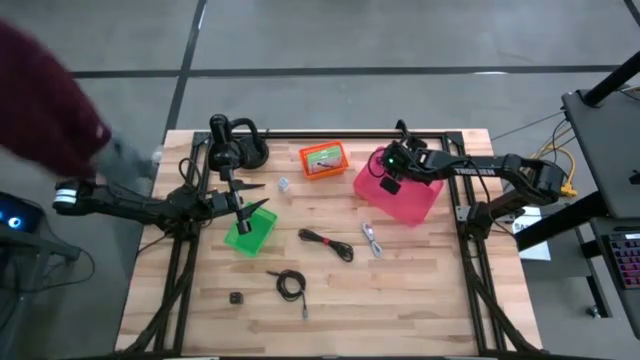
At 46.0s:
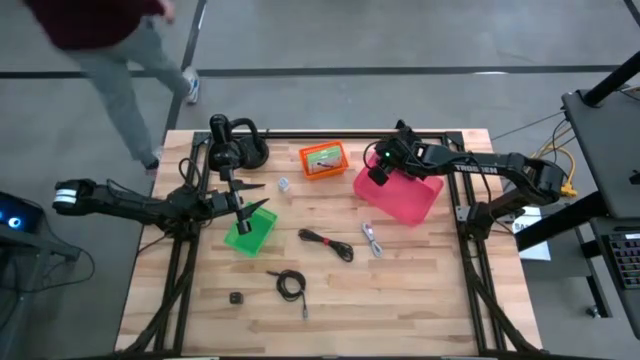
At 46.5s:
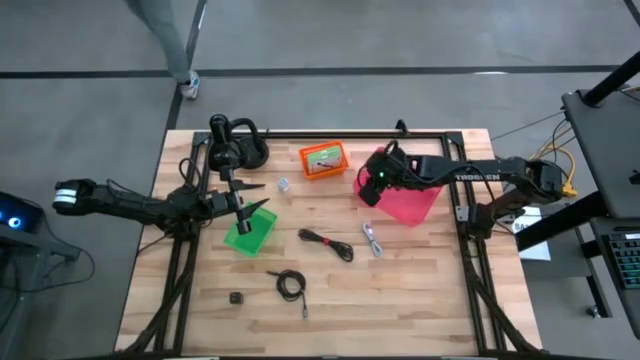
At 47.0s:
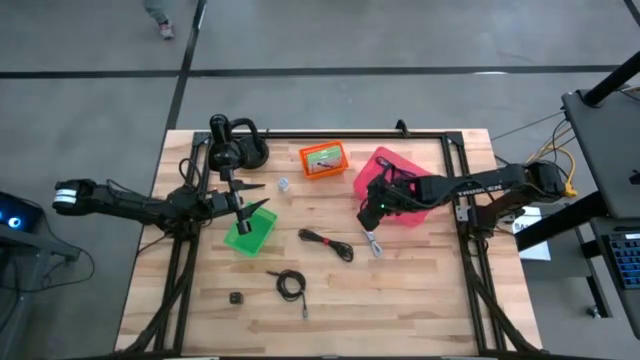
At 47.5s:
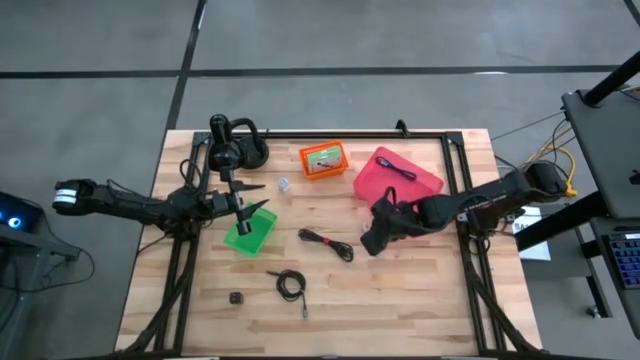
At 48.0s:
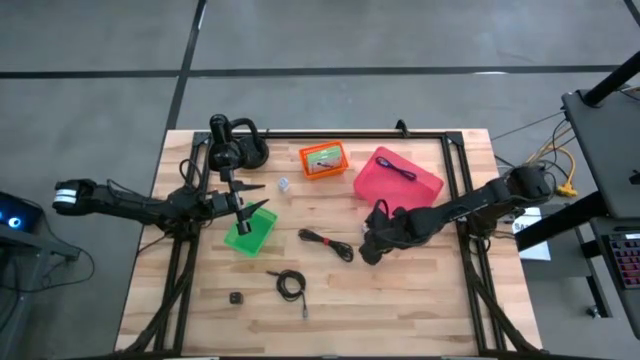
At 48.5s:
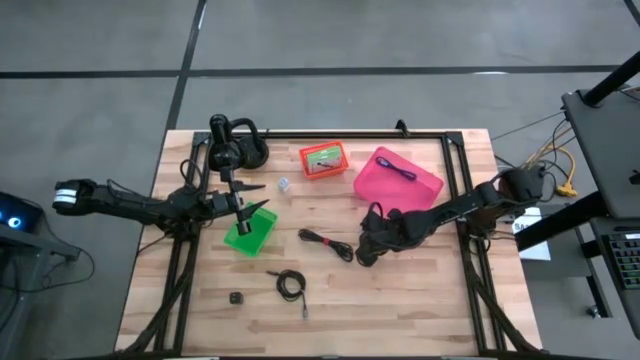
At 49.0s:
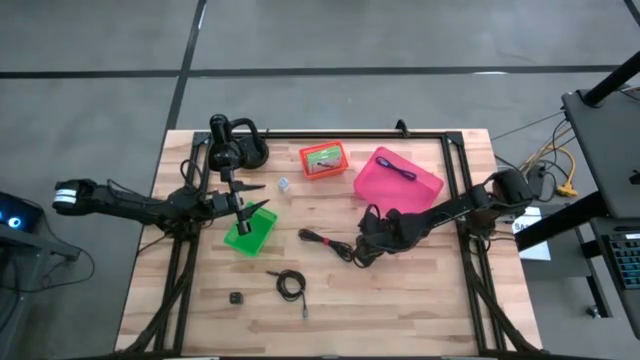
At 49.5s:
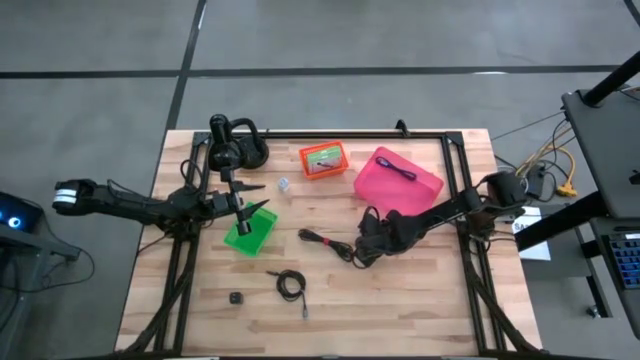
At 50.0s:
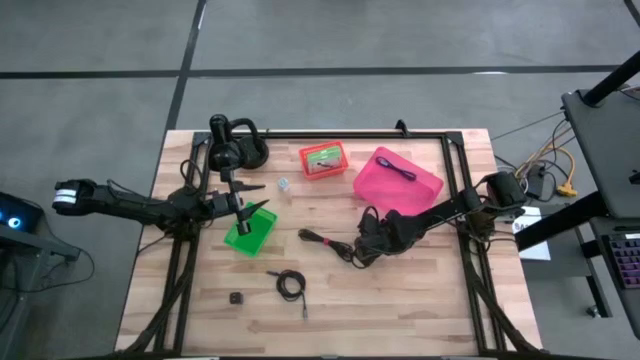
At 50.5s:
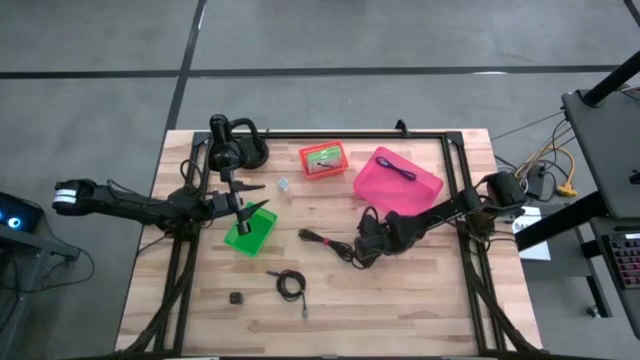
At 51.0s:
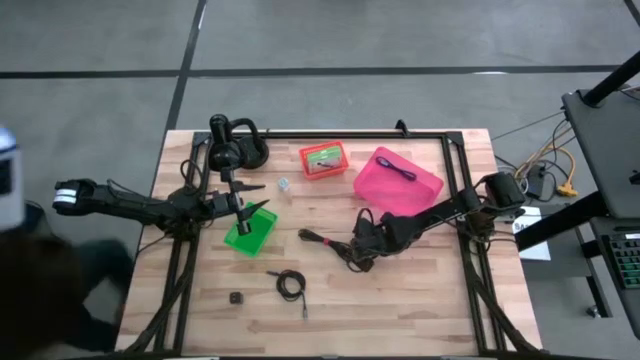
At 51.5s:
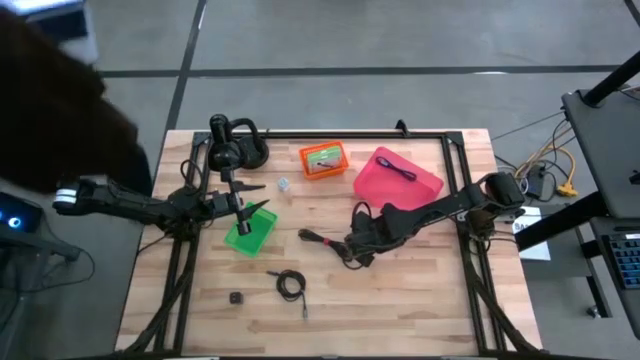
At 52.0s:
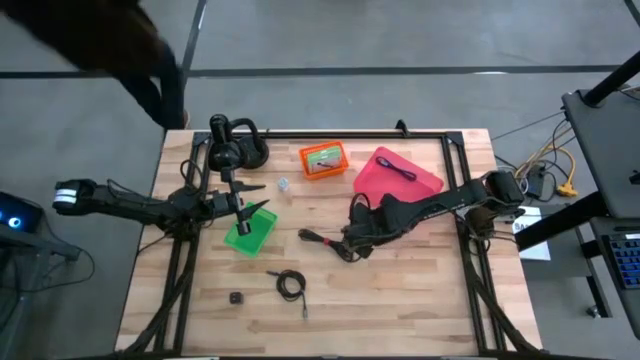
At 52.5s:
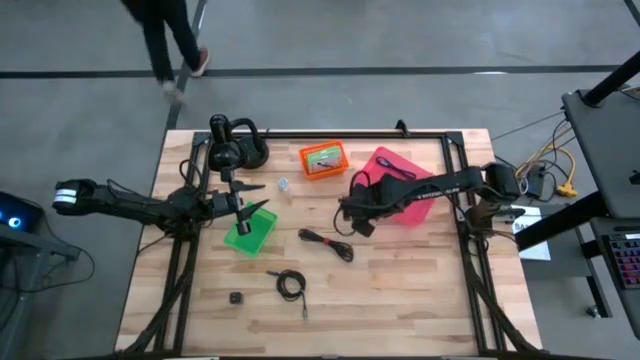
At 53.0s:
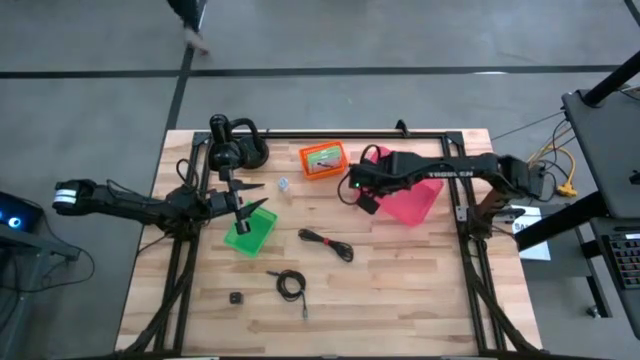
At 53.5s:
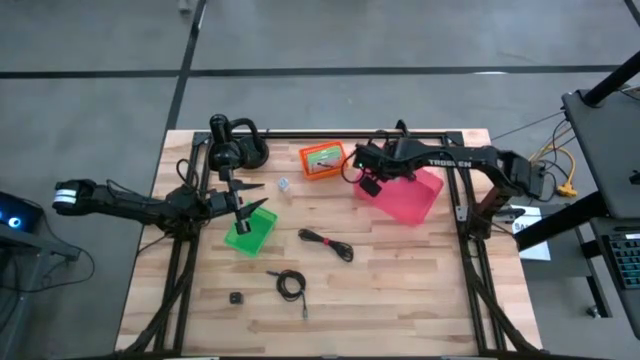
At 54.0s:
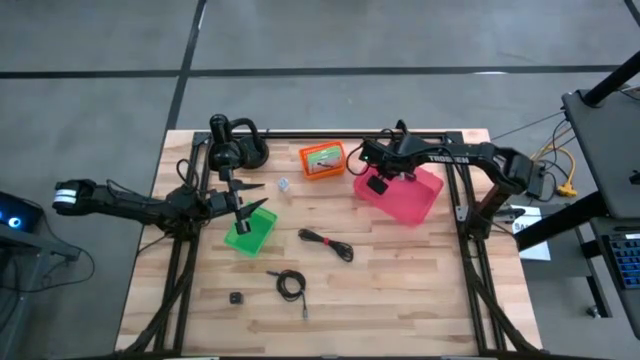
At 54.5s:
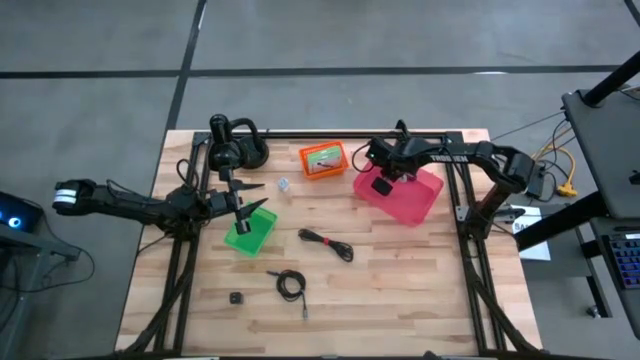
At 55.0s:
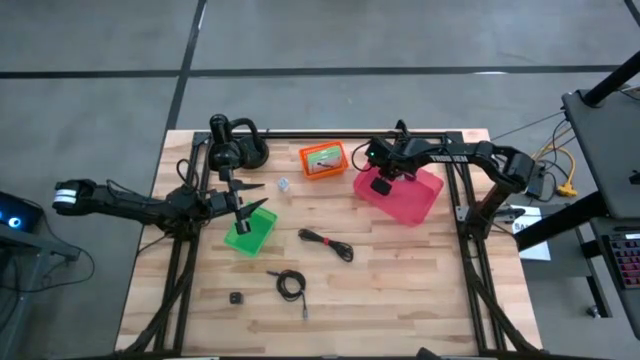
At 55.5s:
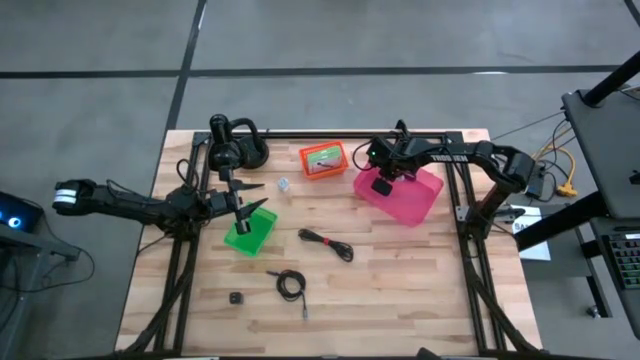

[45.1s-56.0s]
Task: Pick and place items into bin
Put the white charger cable into the pink bin

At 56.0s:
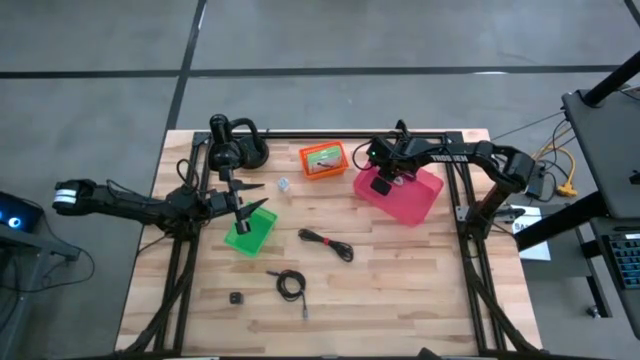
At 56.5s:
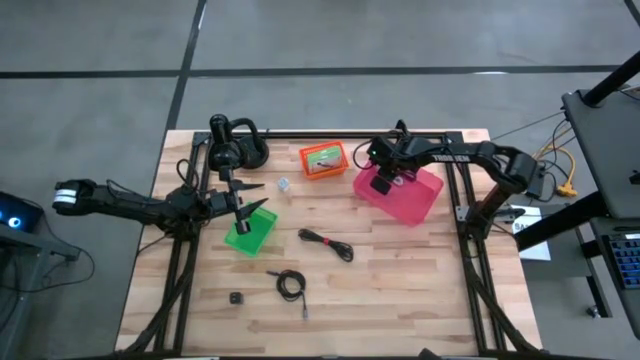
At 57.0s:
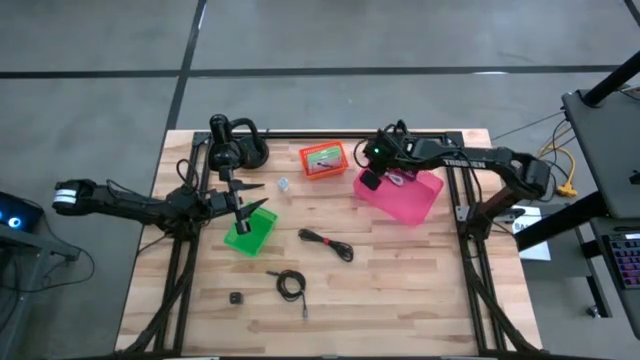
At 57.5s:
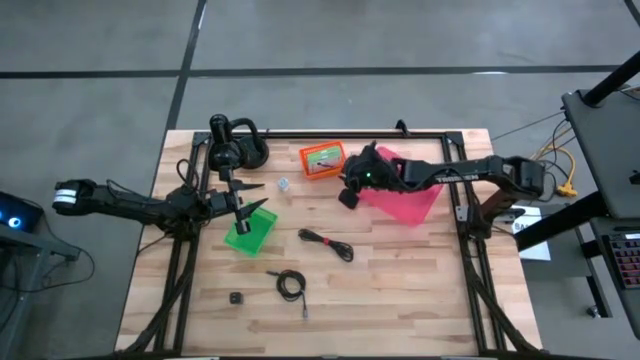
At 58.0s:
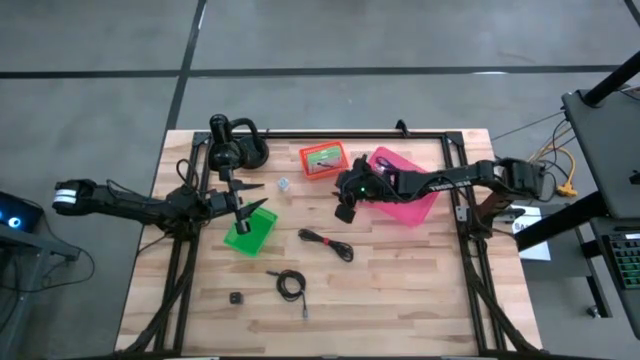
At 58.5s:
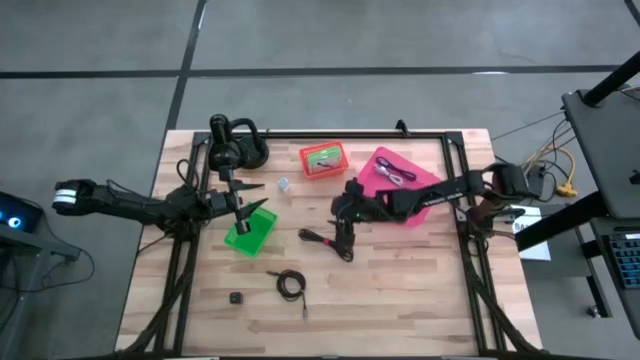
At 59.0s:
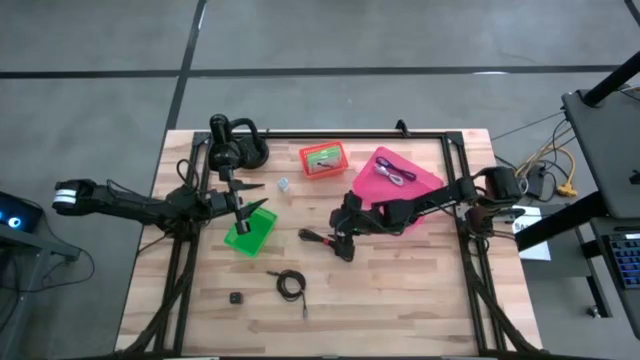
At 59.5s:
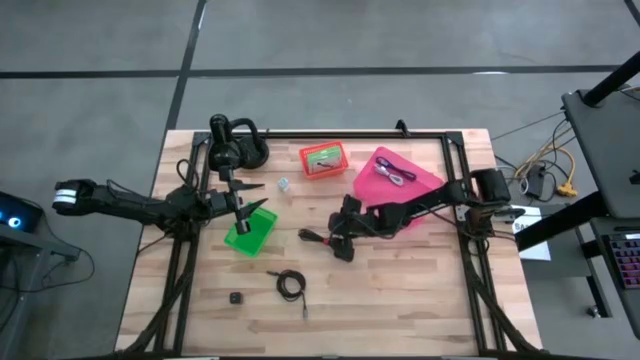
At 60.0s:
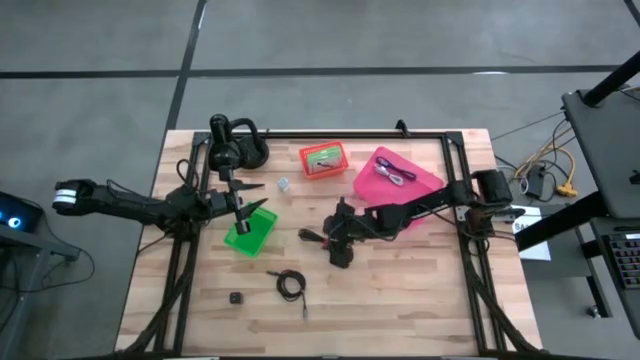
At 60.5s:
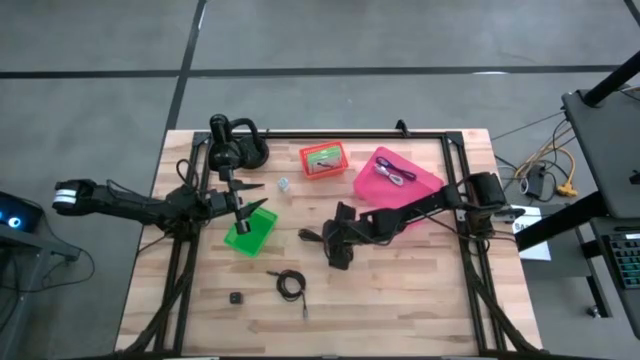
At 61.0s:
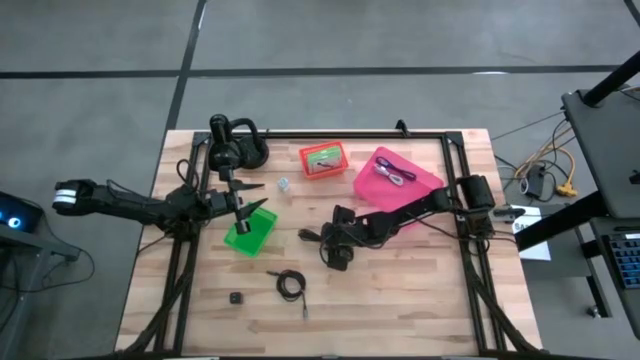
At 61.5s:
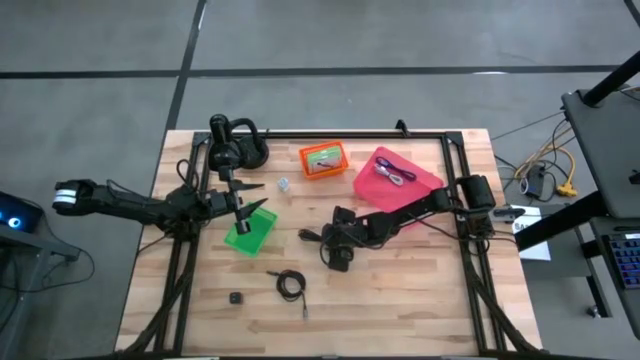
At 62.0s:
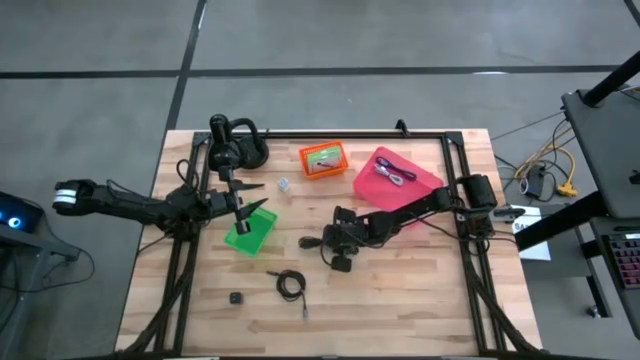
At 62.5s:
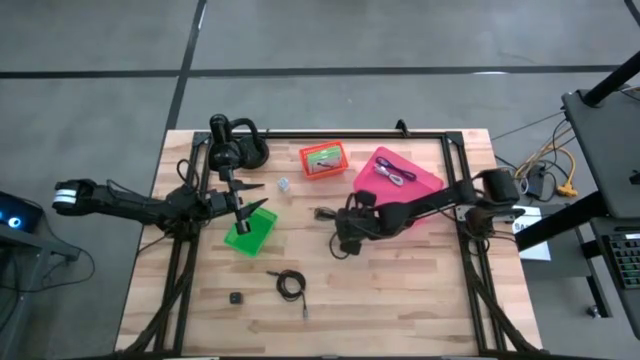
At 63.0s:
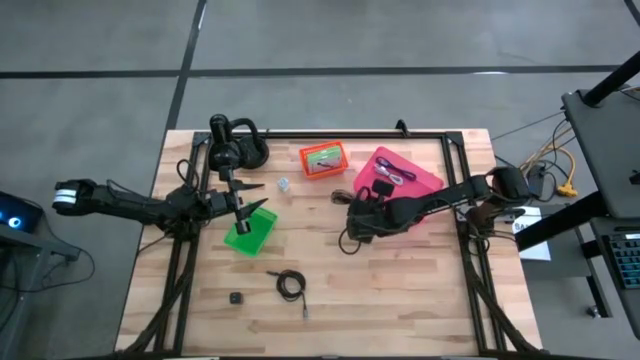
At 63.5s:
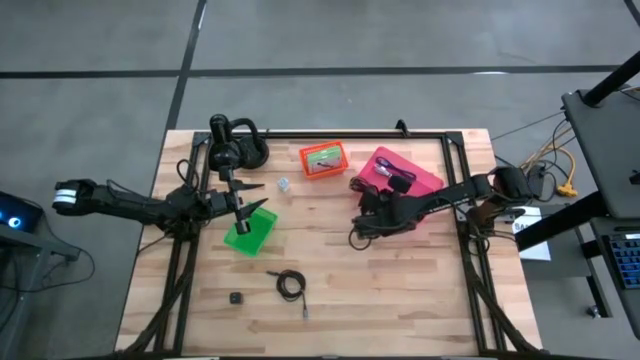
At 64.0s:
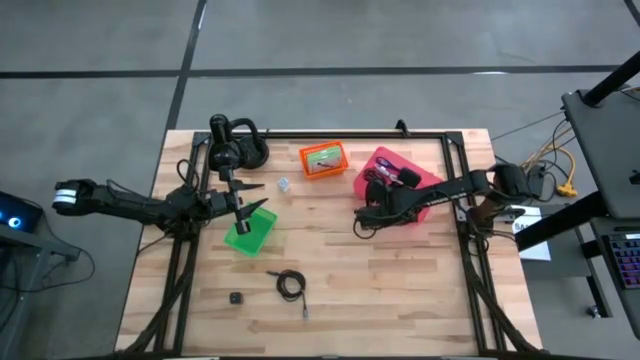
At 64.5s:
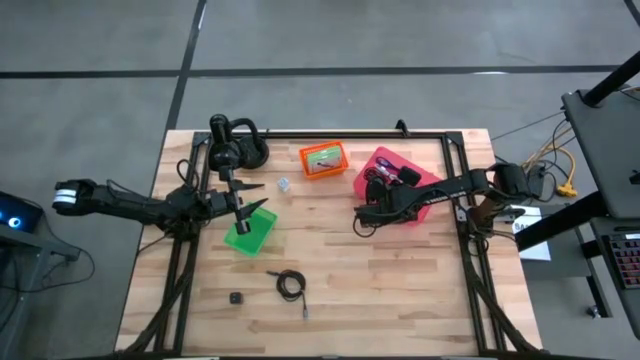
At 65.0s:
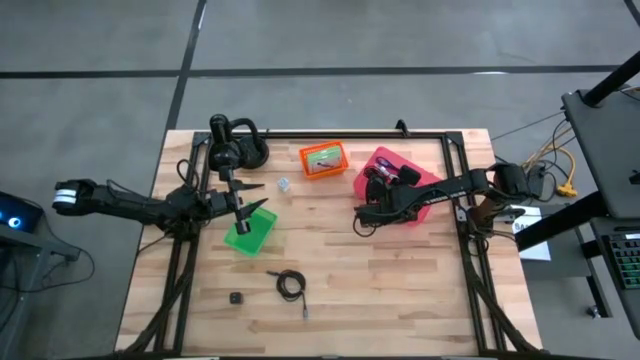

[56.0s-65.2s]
Put the top black charger cable into the pink bin

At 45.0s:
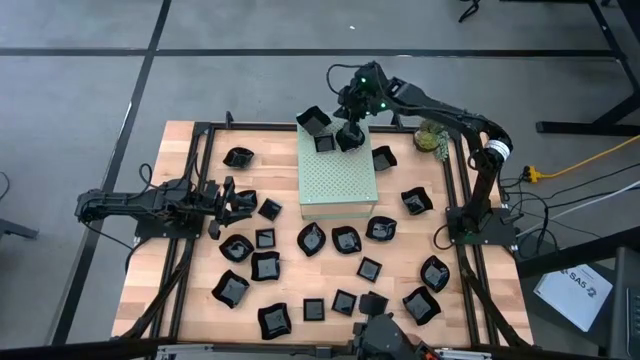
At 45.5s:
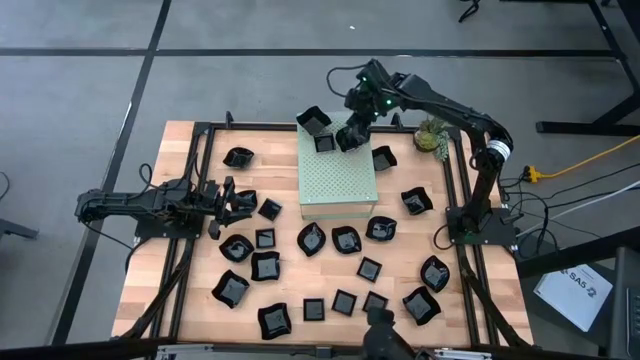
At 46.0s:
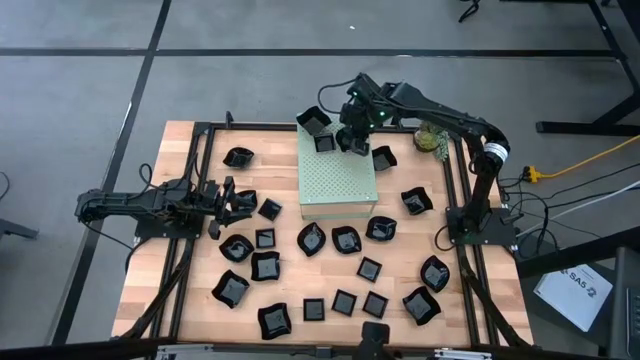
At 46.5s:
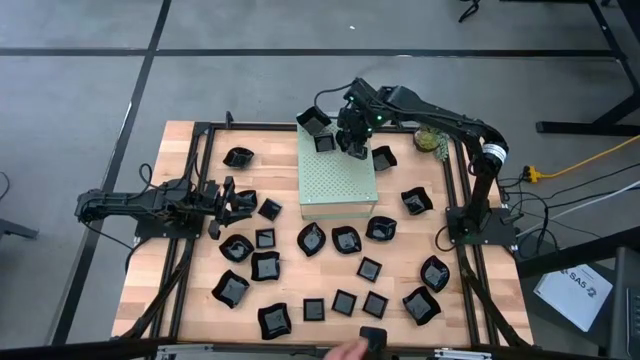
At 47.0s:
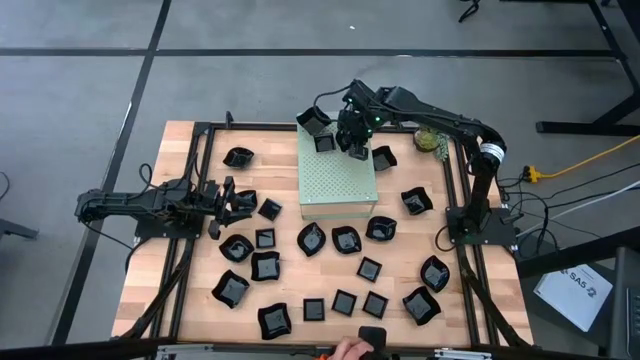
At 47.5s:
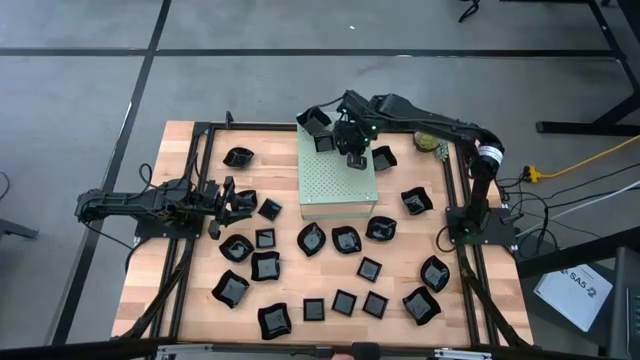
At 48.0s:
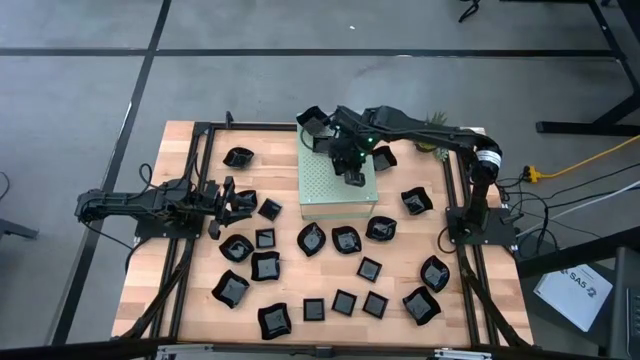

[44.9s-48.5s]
Task: Pick & Place Mini shaped plates
Adjust the black leaf shaped plate on the shelf
